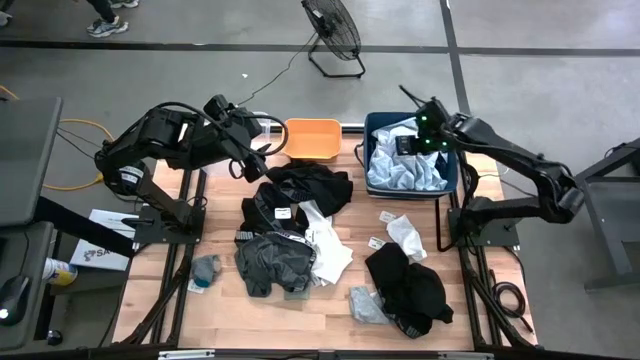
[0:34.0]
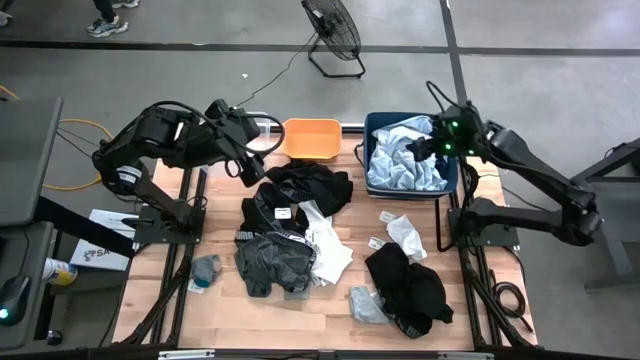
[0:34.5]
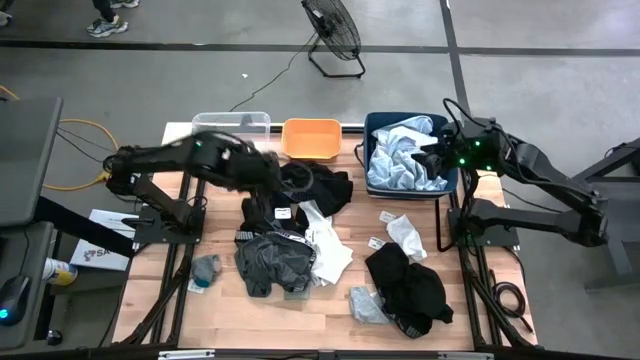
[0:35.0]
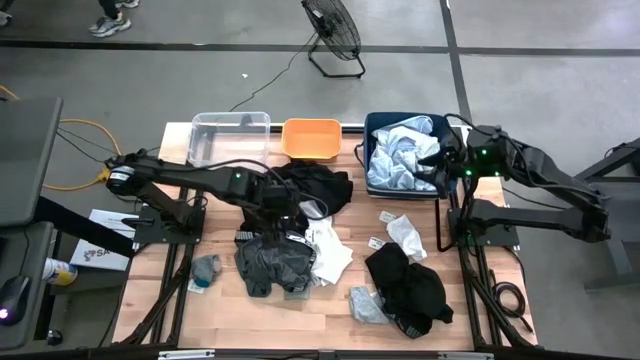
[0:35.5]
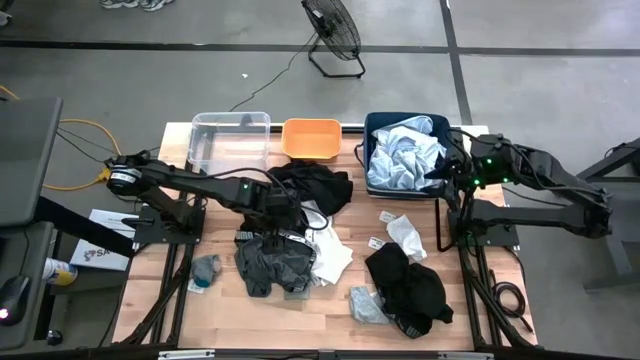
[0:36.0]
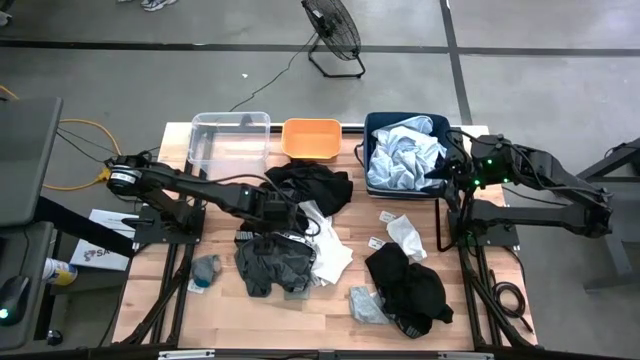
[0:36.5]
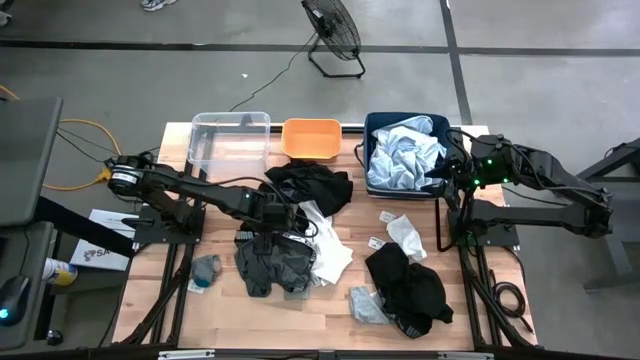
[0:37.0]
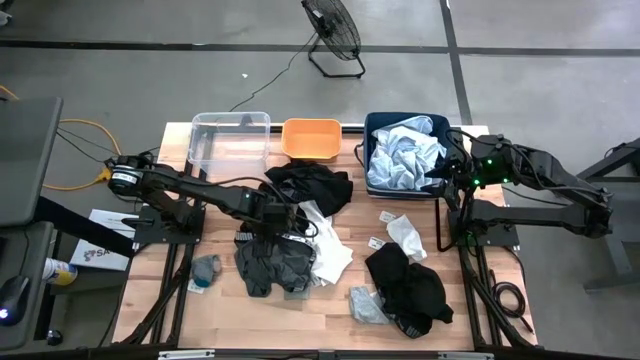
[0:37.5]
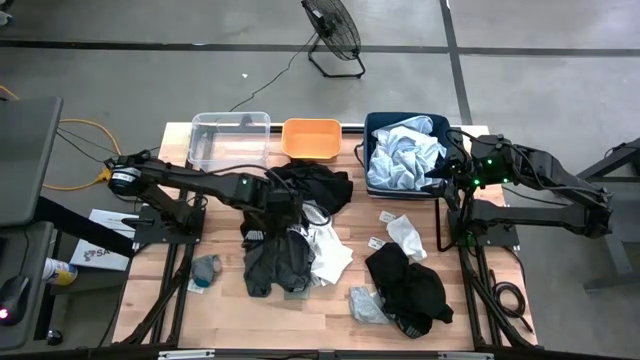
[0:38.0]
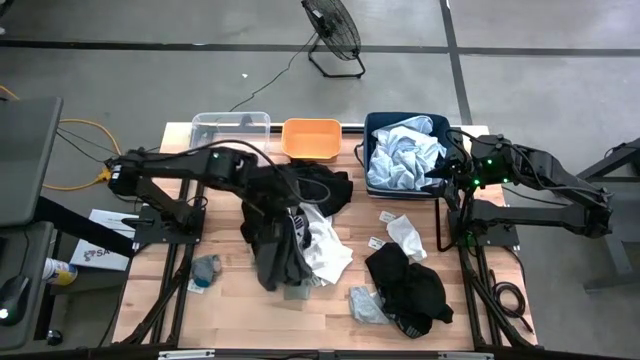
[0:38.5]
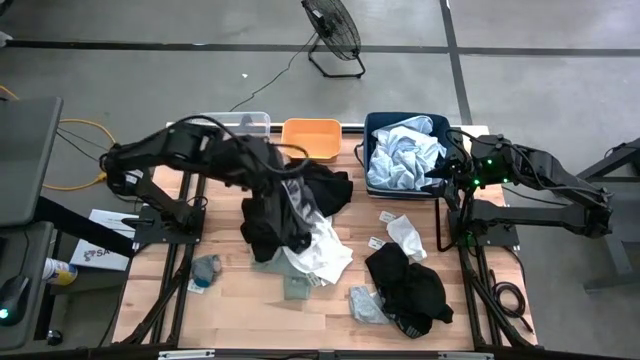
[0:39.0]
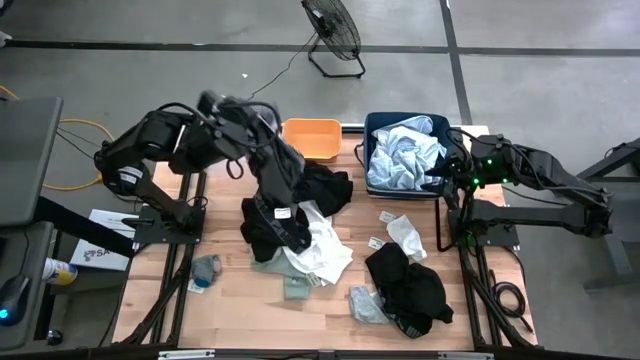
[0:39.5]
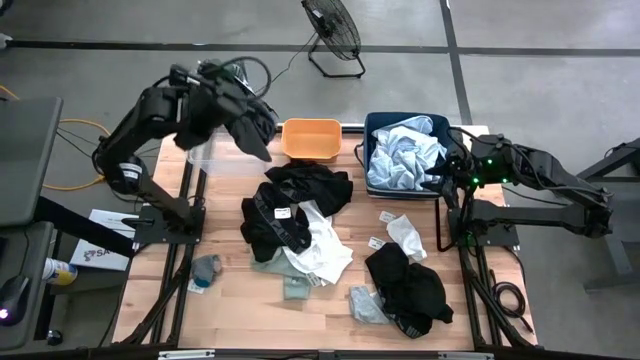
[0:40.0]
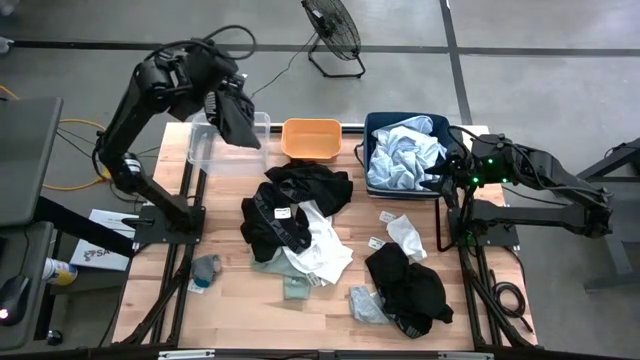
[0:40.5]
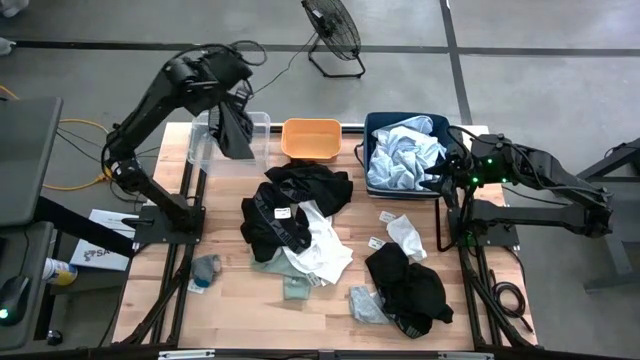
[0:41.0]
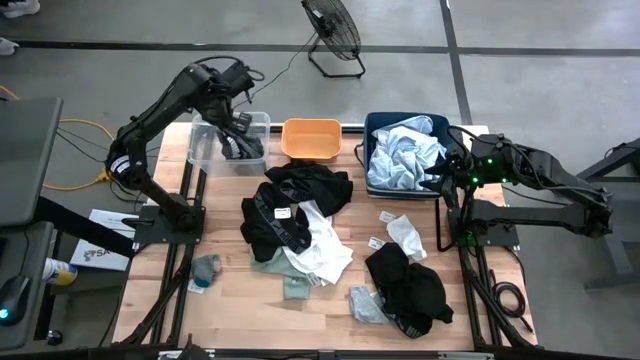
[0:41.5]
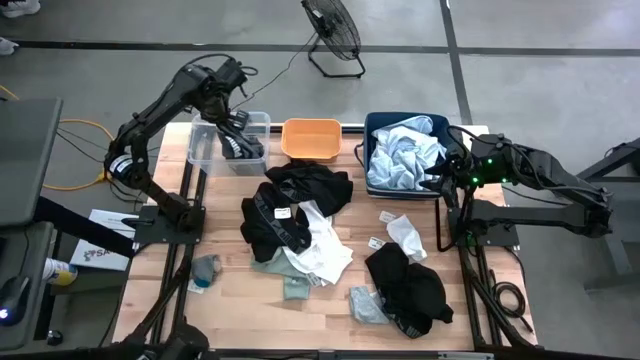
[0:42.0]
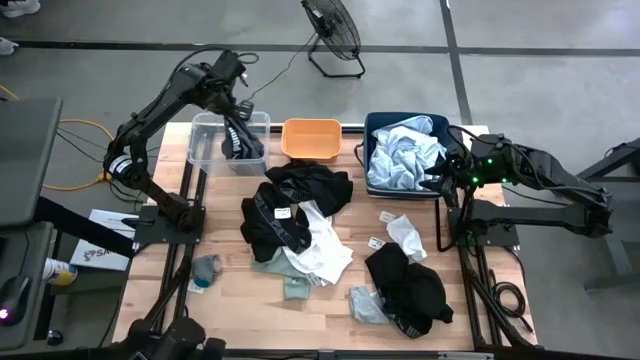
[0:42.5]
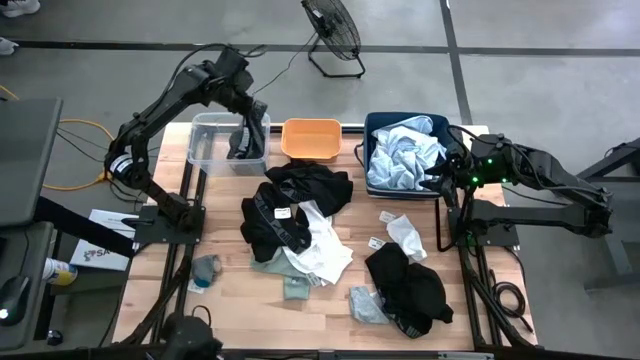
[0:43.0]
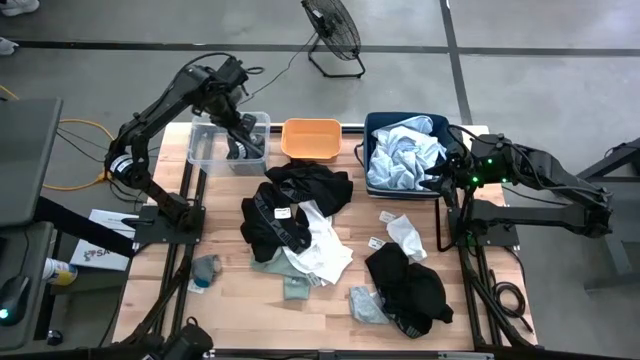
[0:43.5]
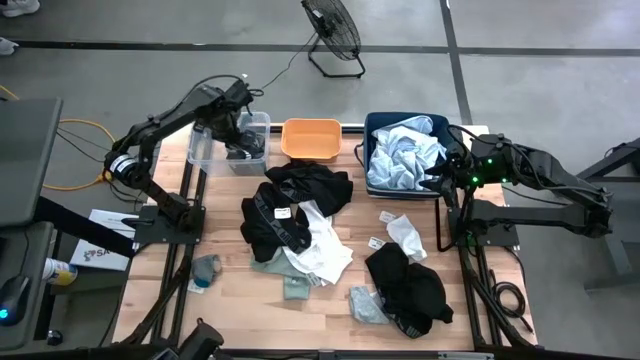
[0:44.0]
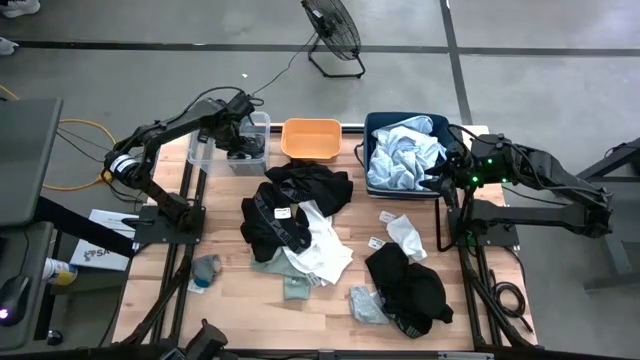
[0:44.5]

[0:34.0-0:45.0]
Task: Pick & Place Cloths
Put the gray underwear into the transparent bin

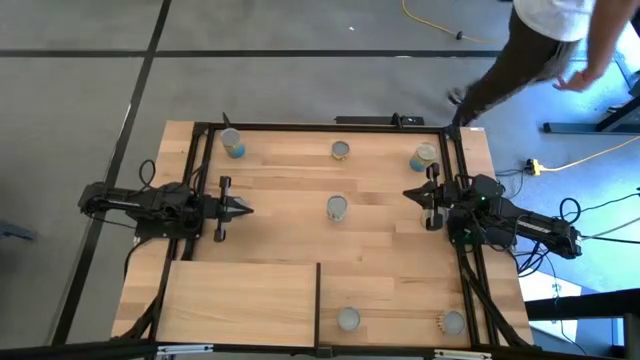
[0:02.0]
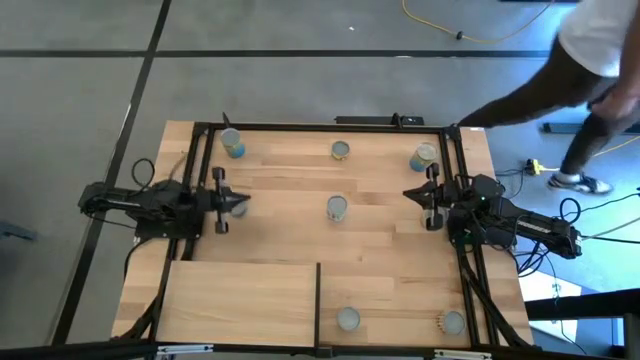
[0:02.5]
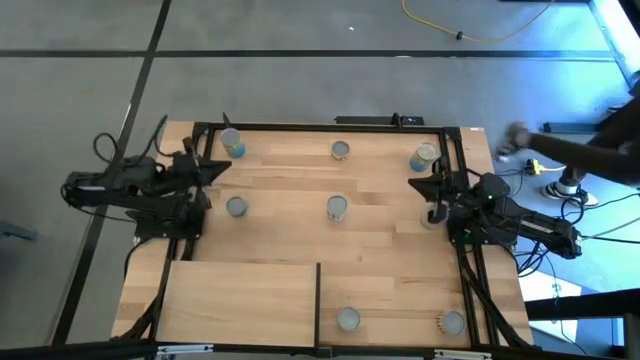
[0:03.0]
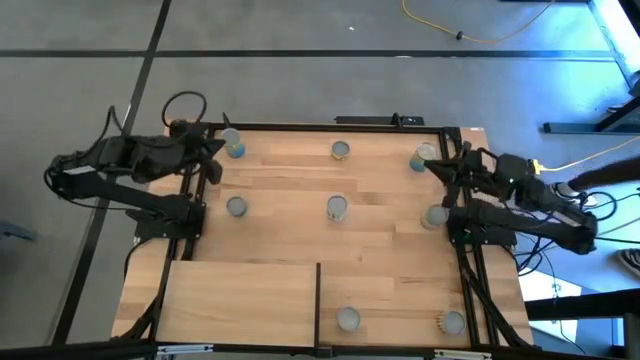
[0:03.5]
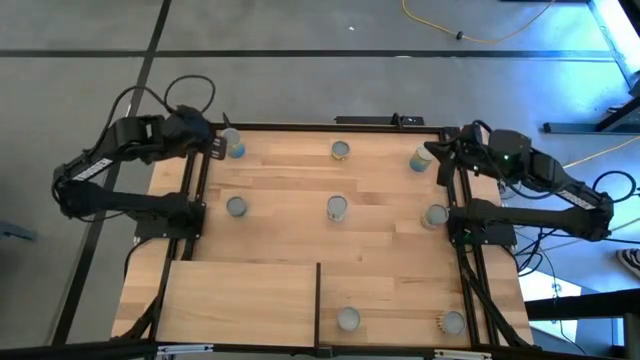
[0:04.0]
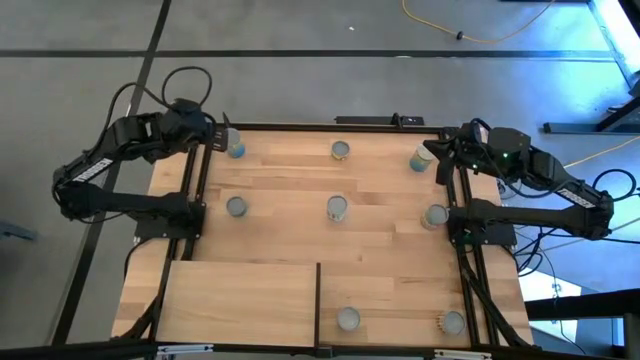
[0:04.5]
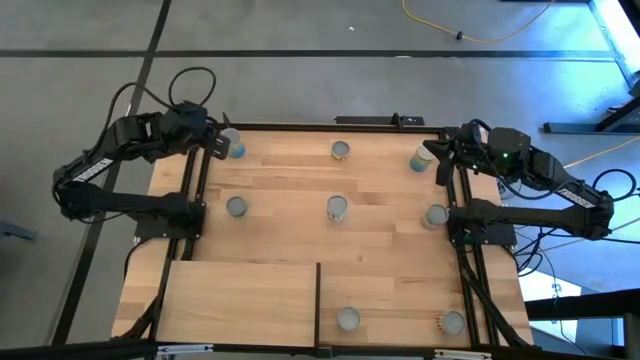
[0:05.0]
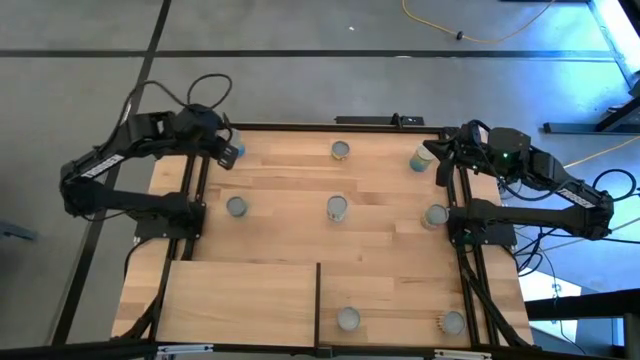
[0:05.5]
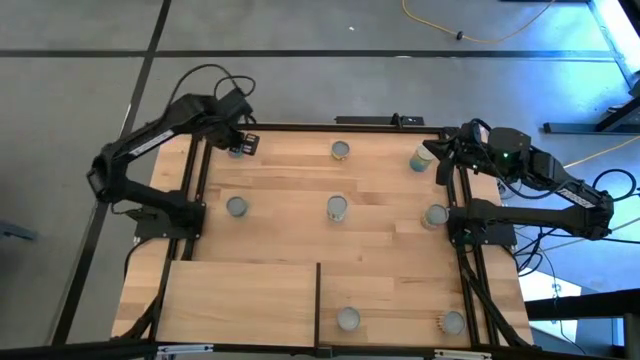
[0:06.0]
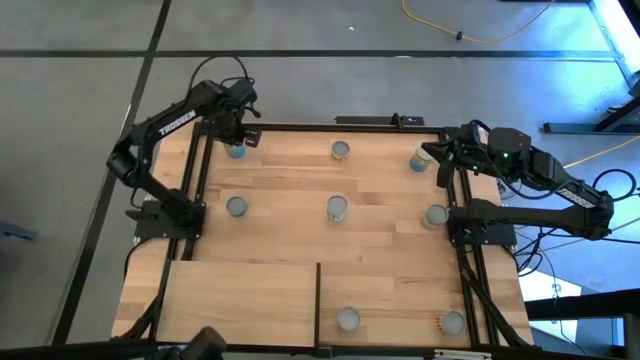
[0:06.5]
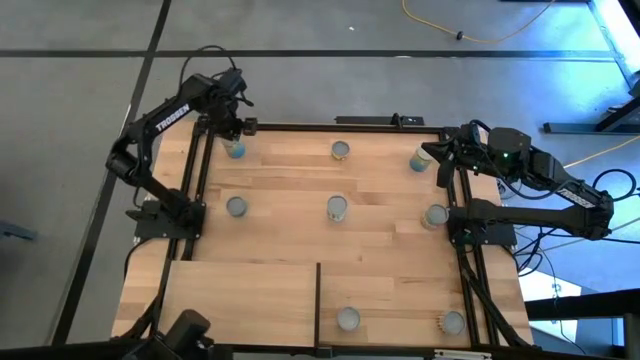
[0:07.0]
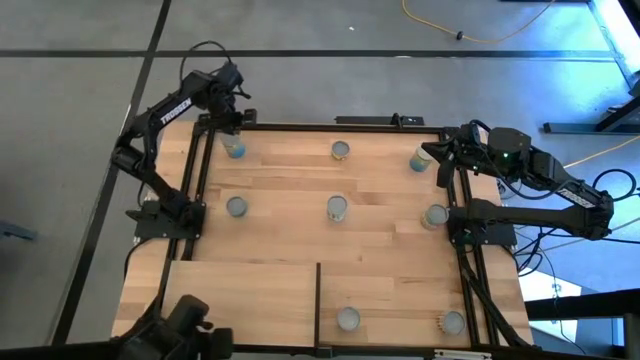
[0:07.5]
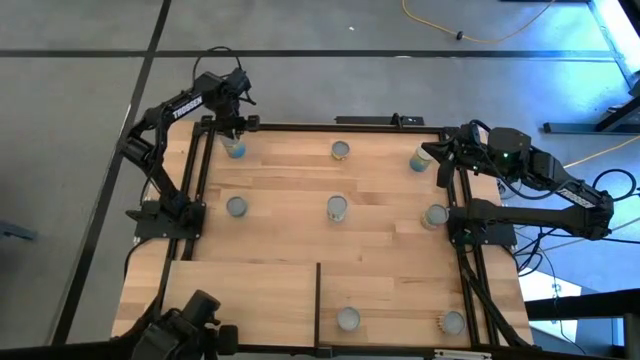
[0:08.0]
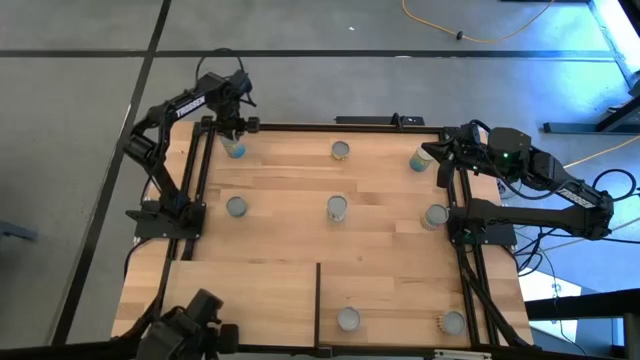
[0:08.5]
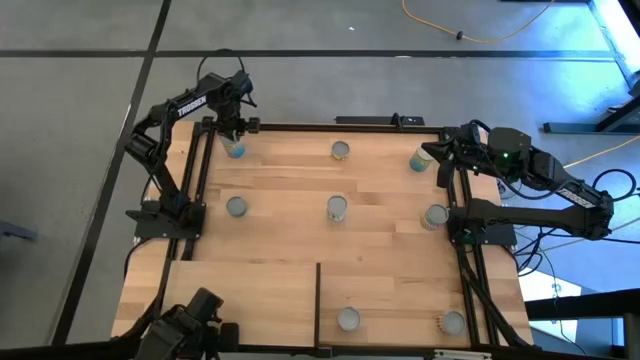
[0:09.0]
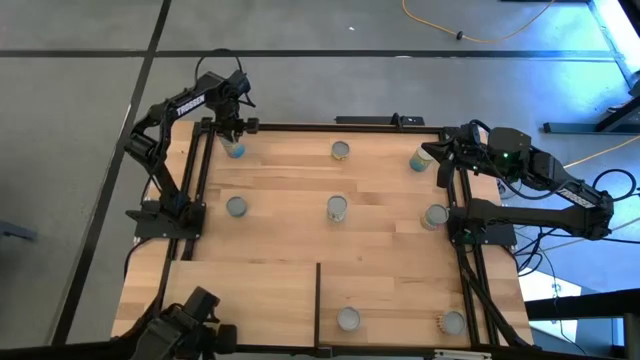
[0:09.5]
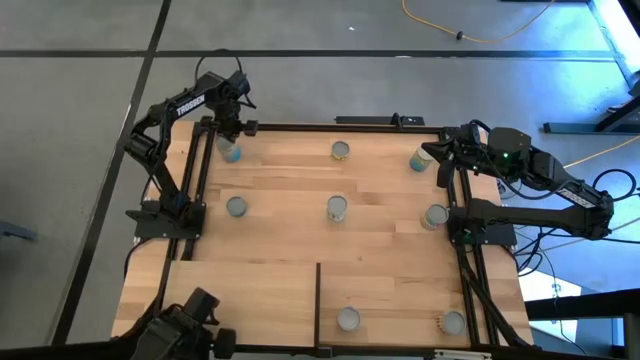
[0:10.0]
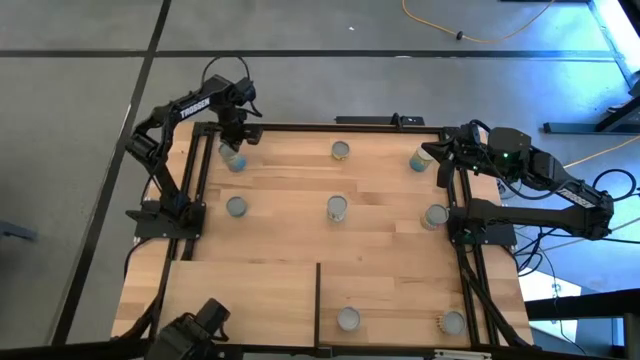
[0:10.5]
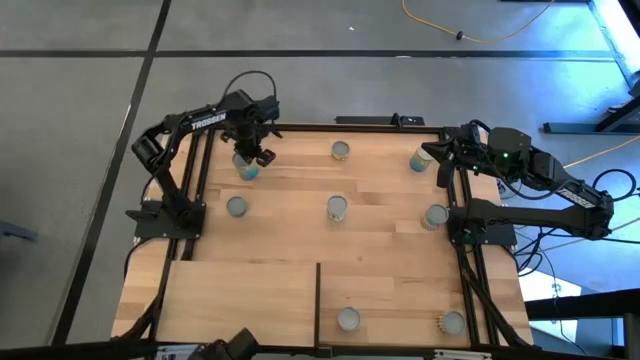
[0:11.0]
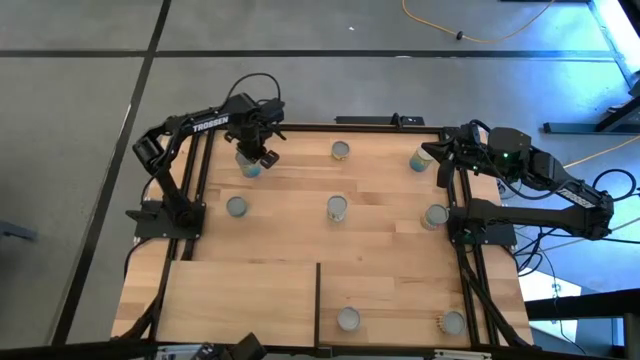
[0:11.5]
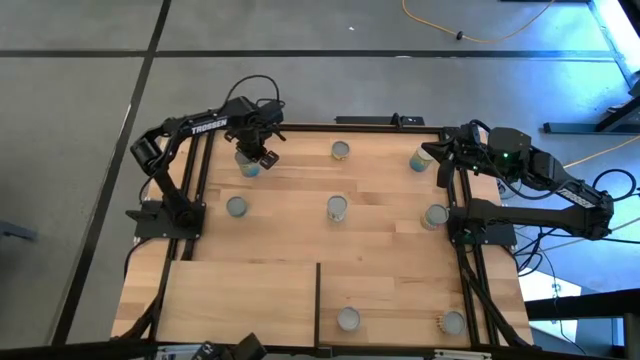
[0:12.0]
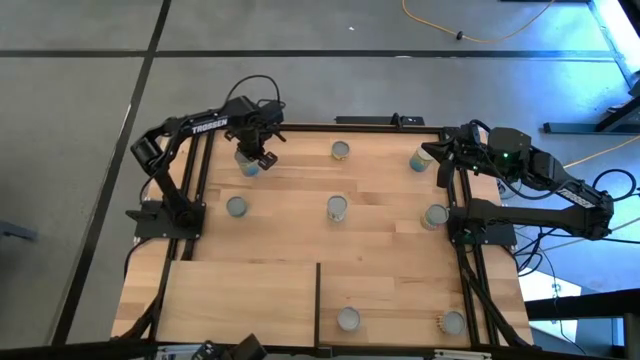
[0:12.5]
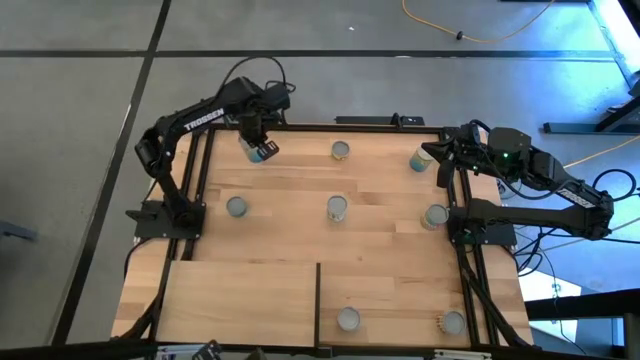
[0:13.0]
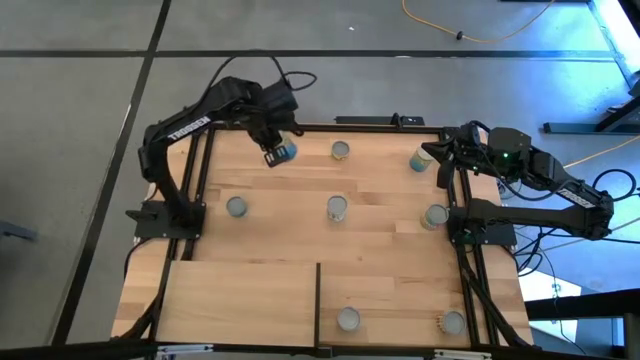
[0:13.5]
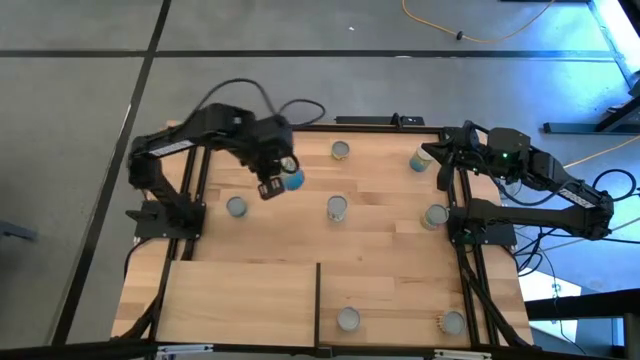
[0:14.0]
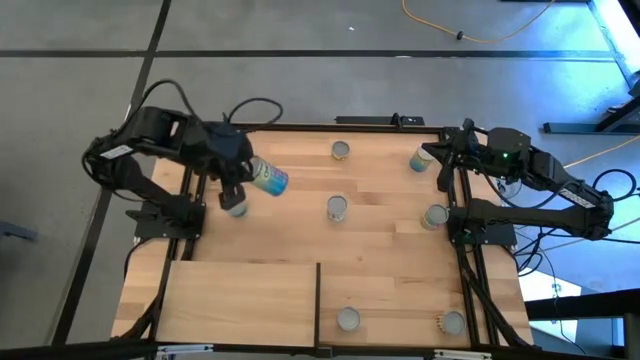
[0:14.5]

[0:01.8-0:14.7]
Task: Pick and place cans onto a shelf
Put the canned cherries on the shelf
